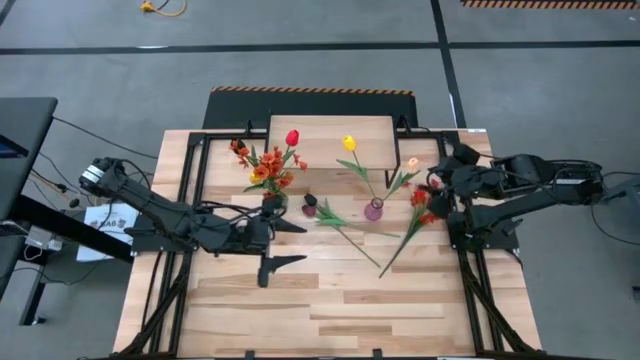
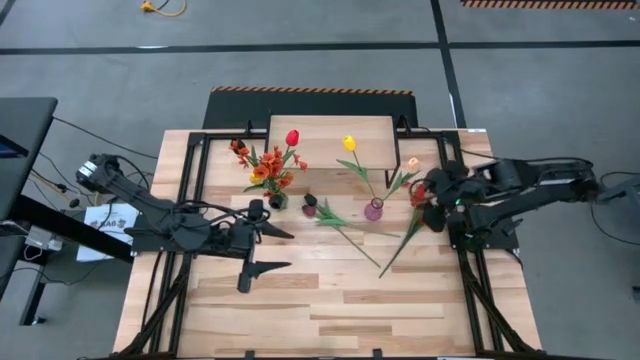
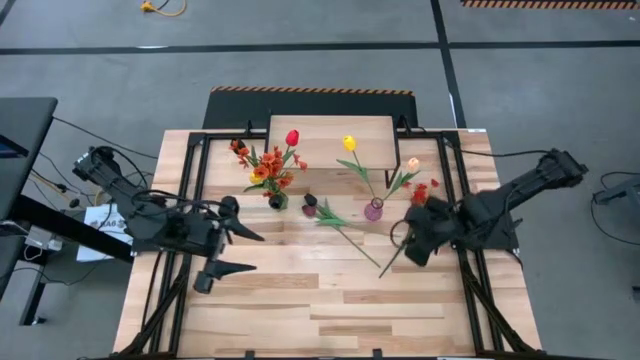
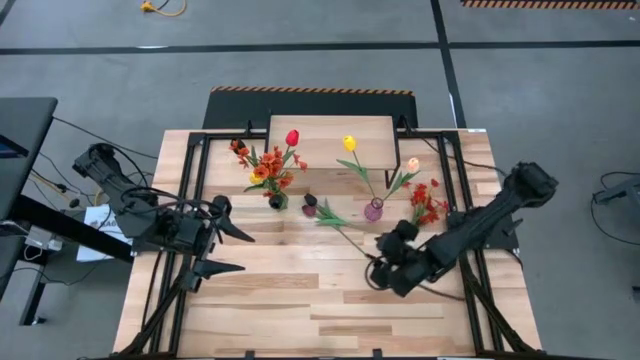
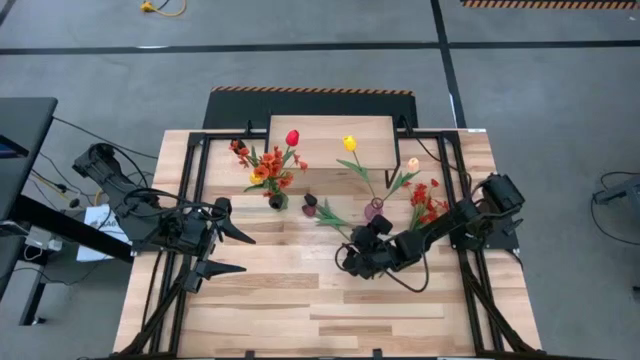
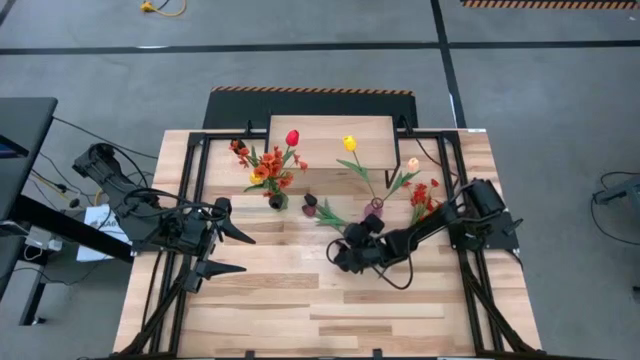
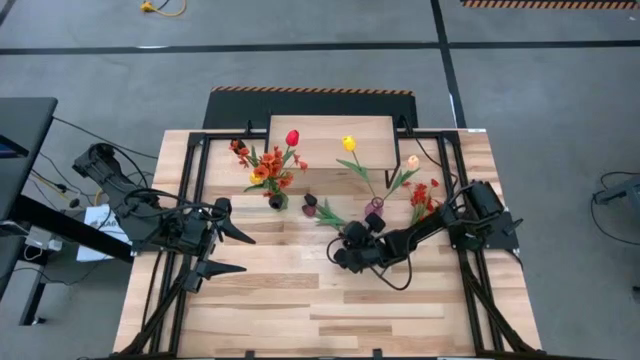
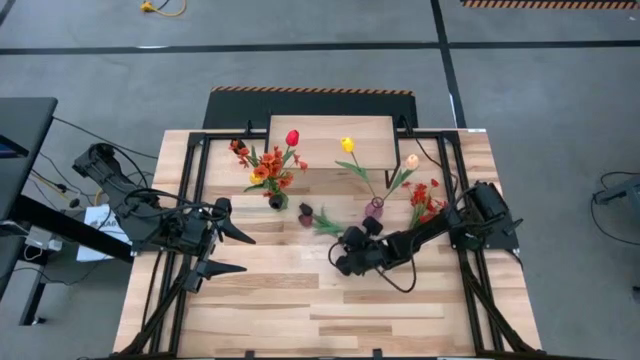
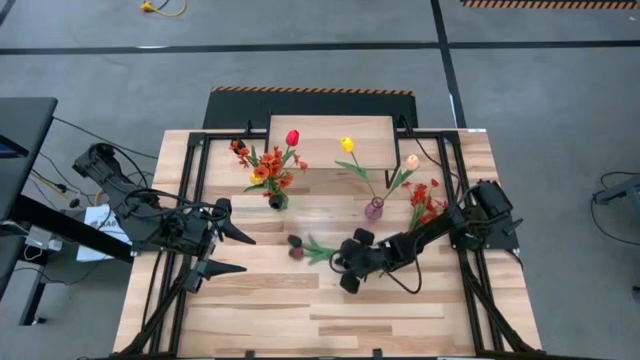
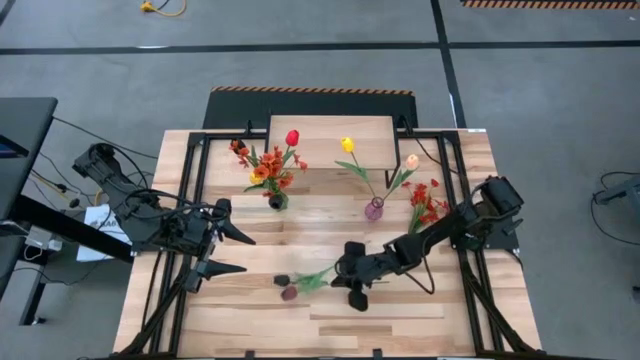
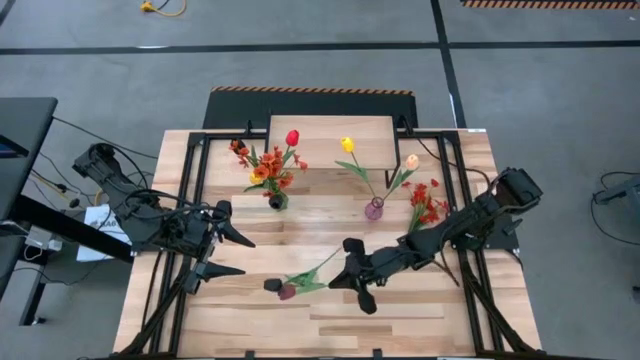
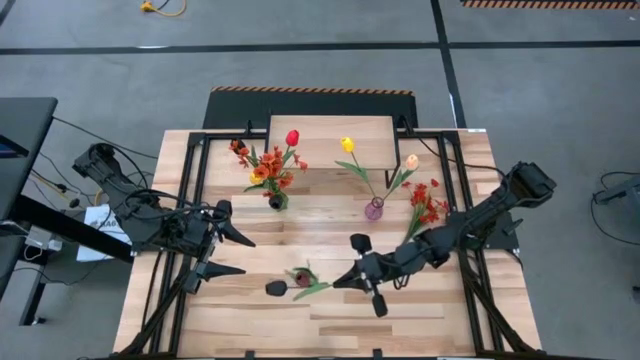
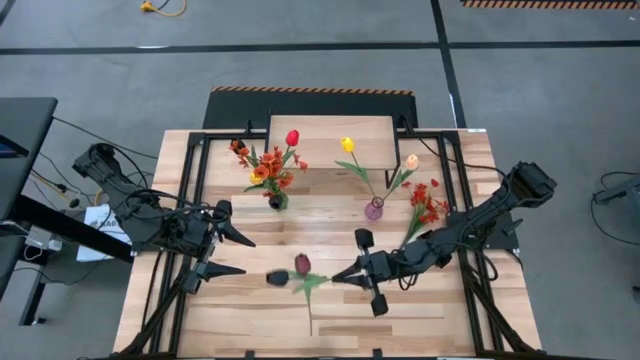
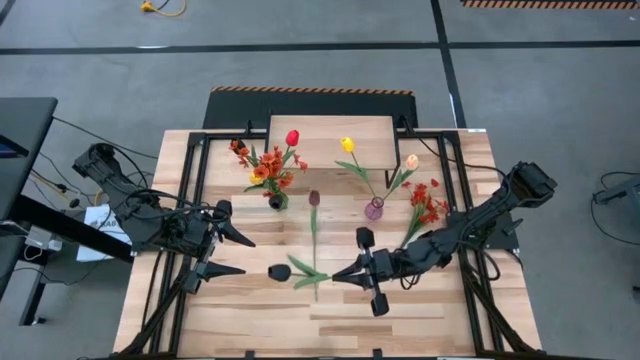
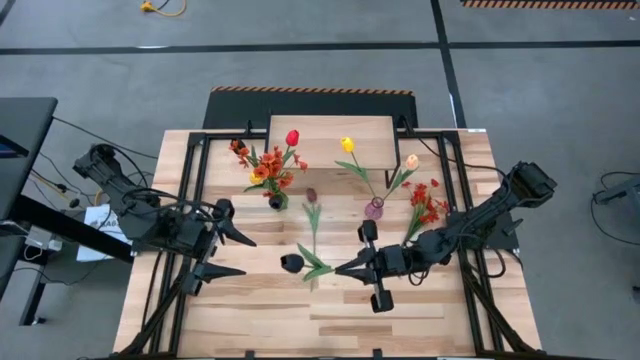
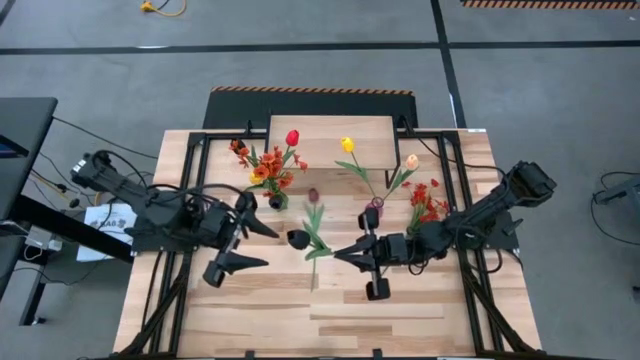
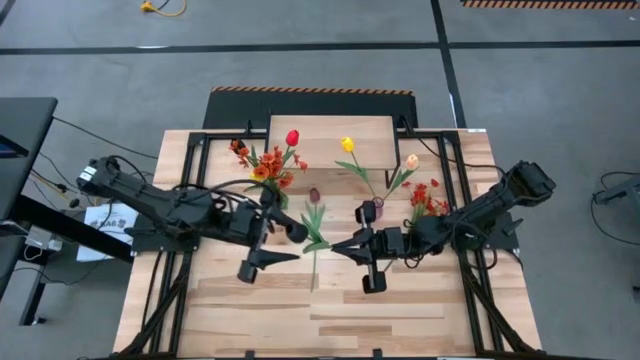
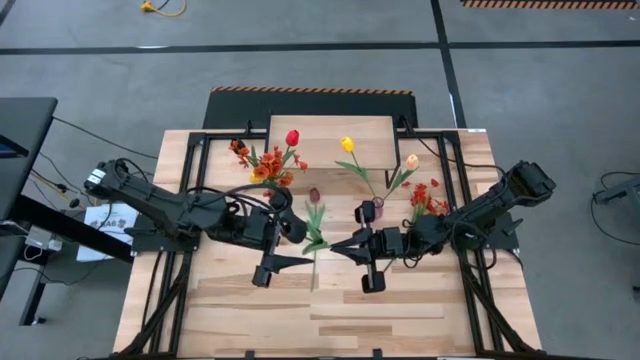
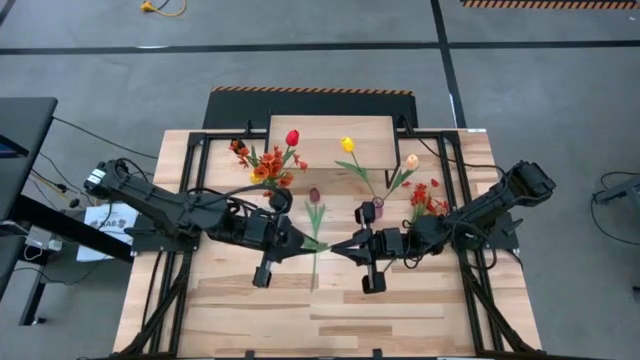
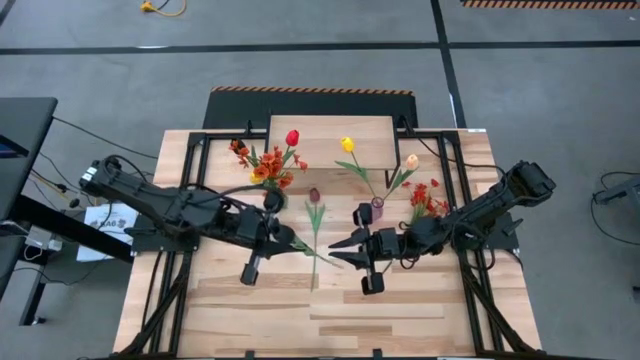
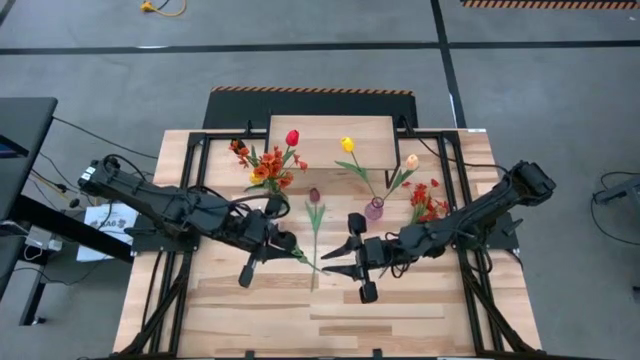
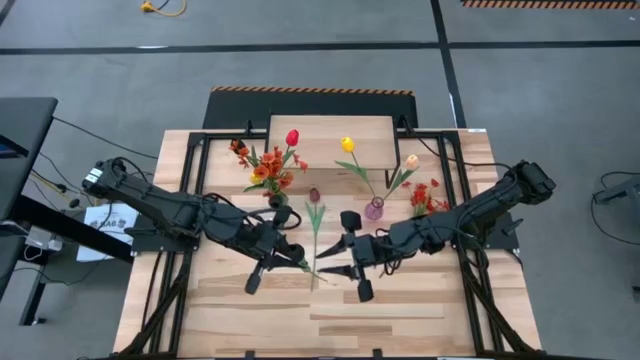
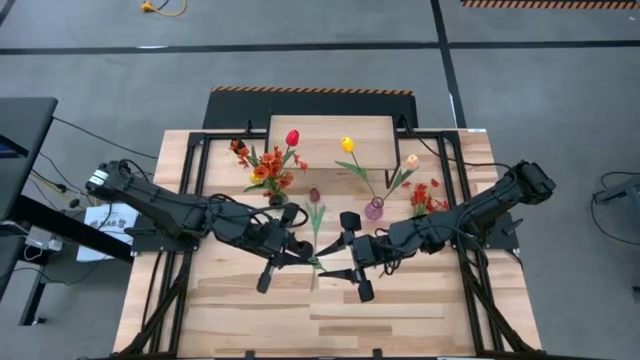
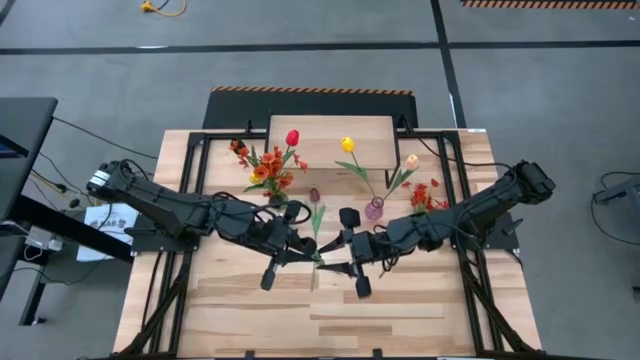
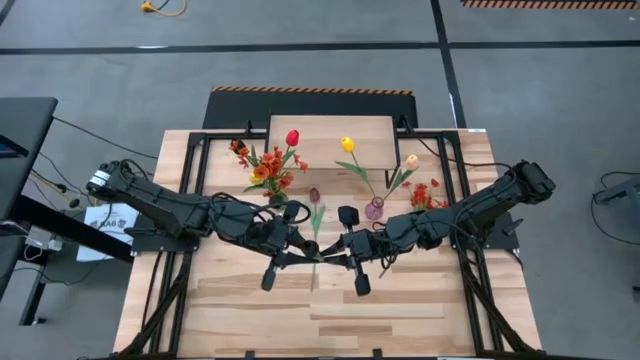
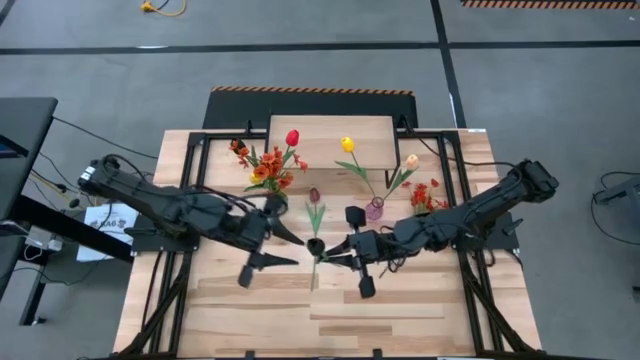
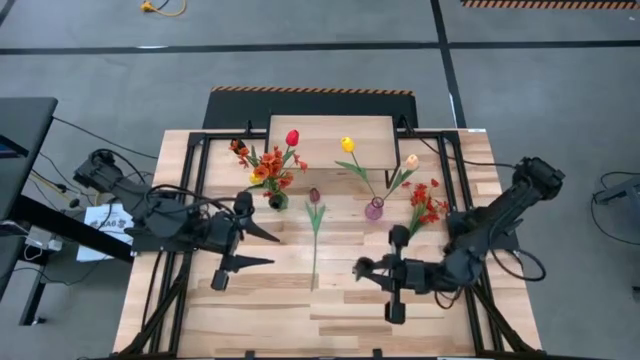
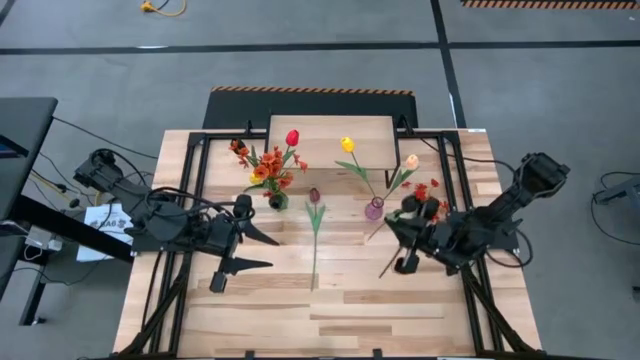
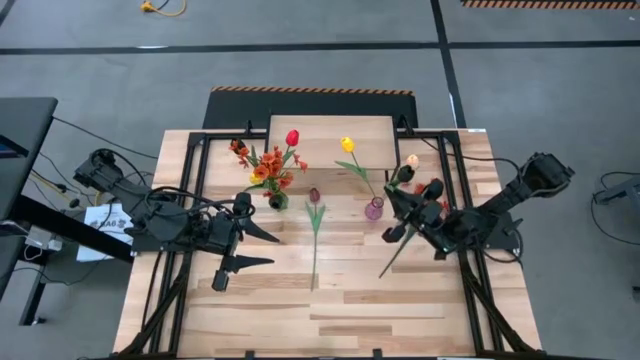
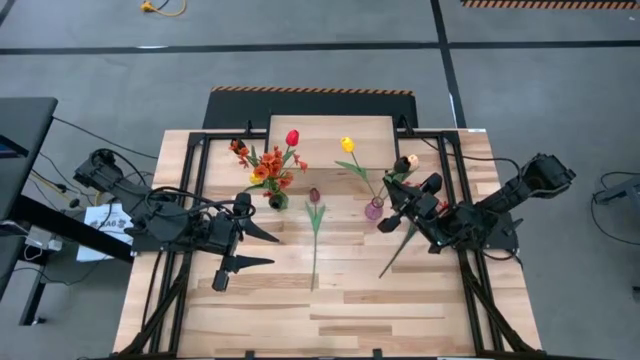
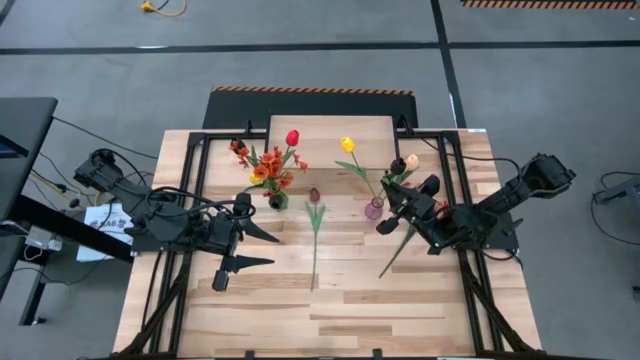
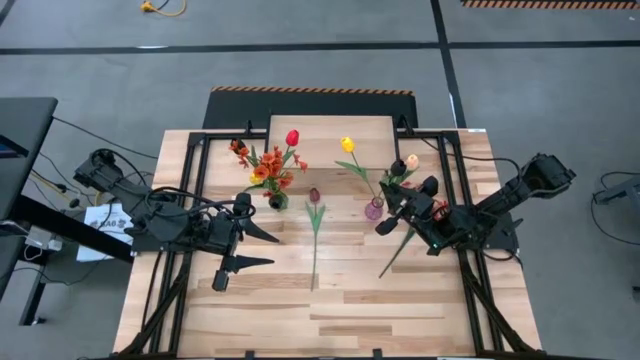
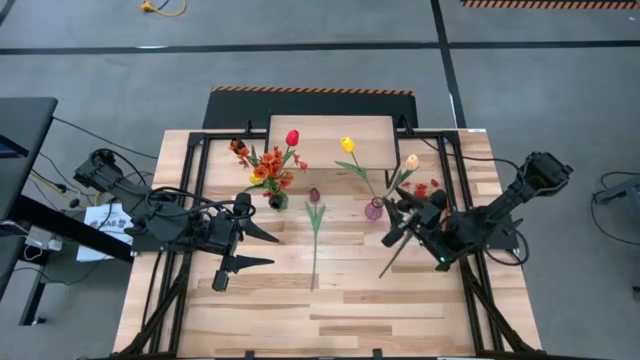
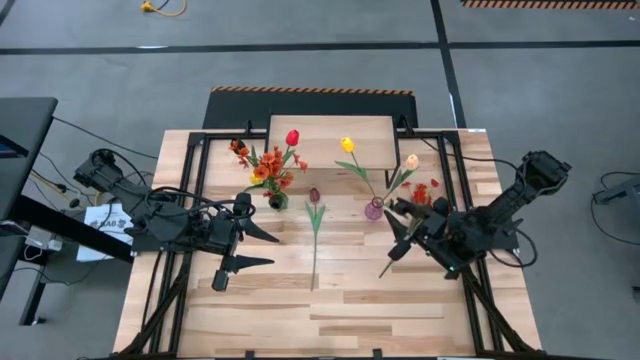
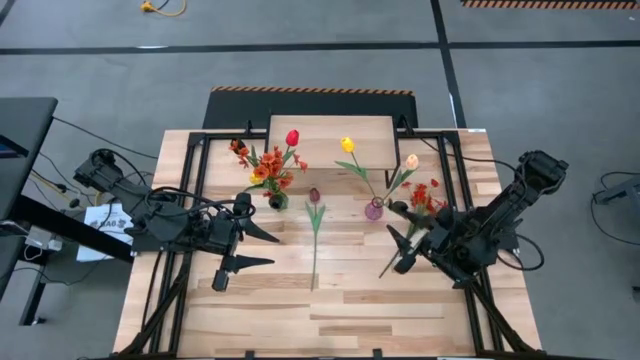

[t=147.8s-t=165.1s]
Task: Pick and place flowers into a vace then onto a shelf
Put the black tulip into the purple vase

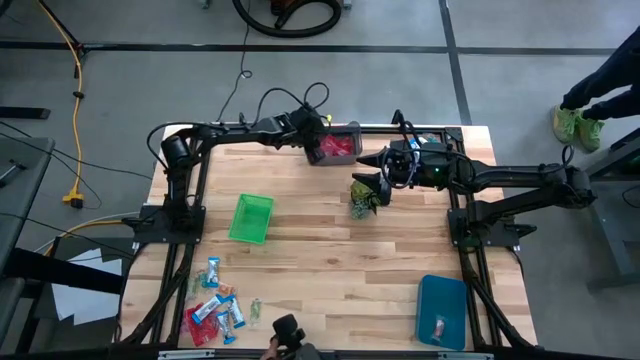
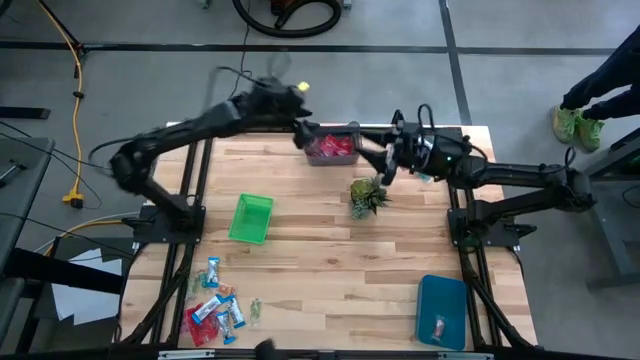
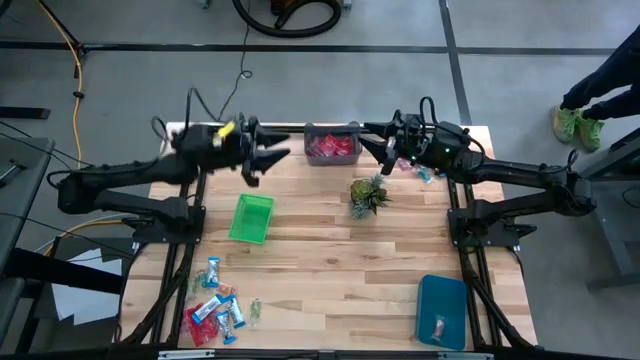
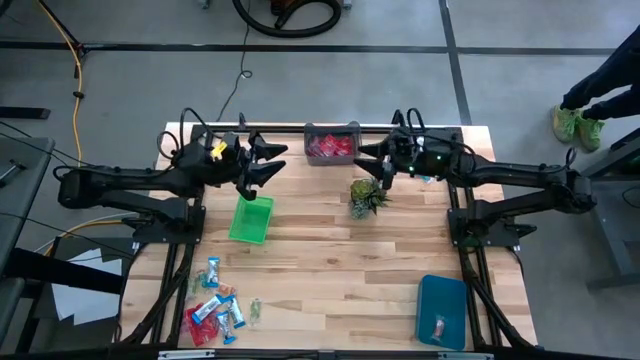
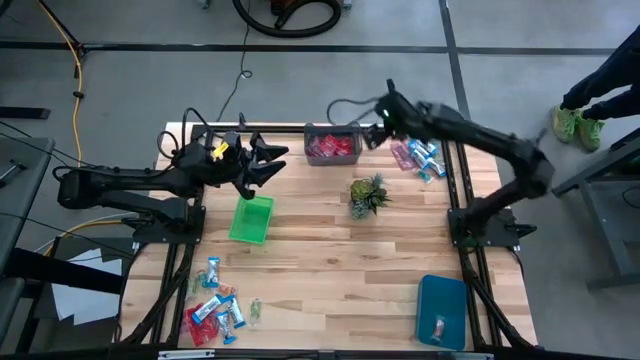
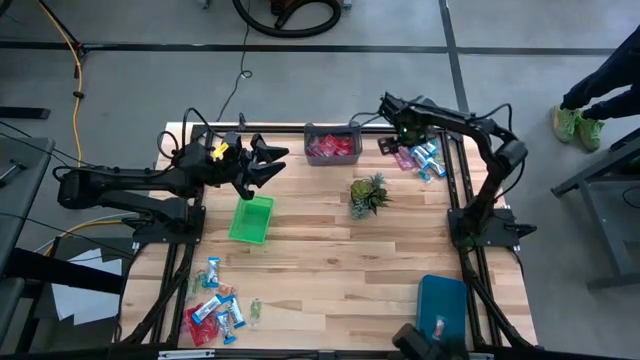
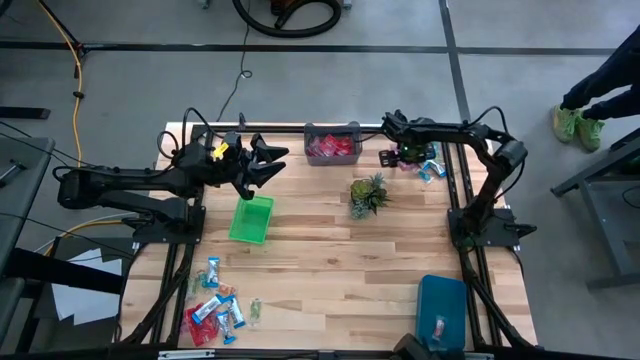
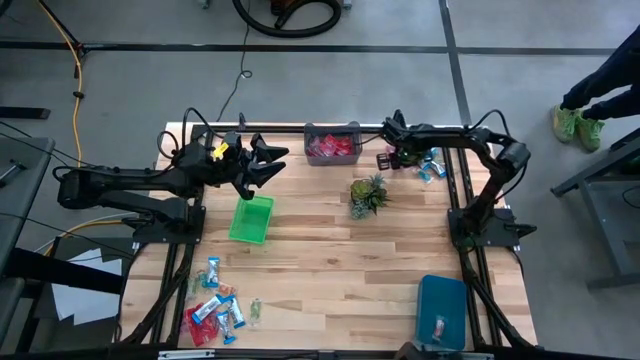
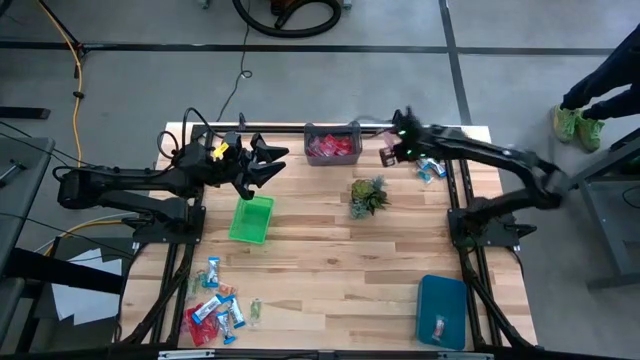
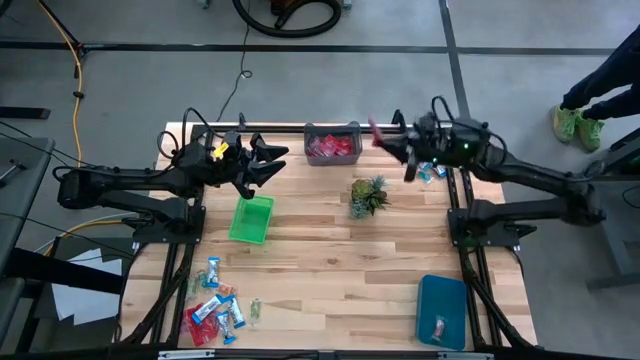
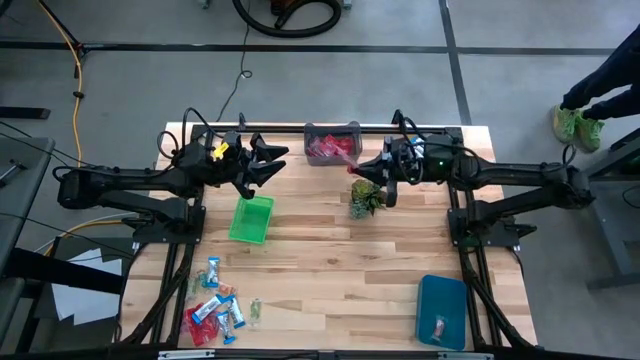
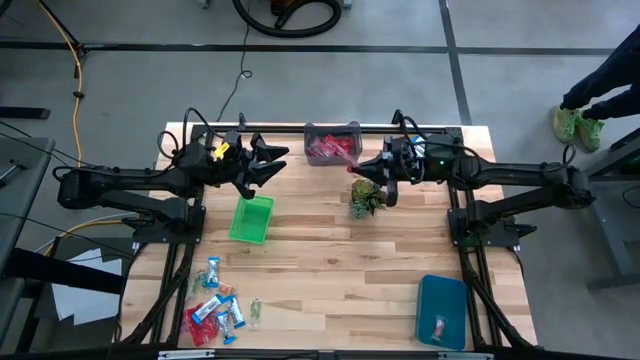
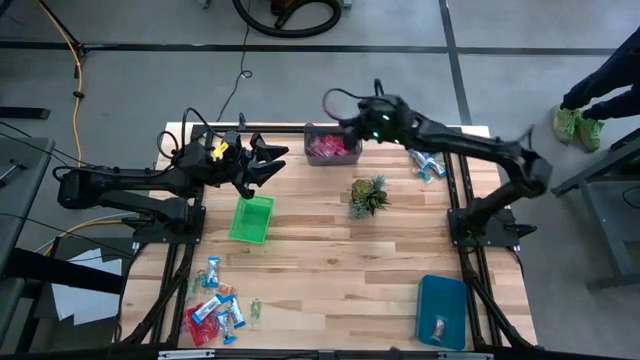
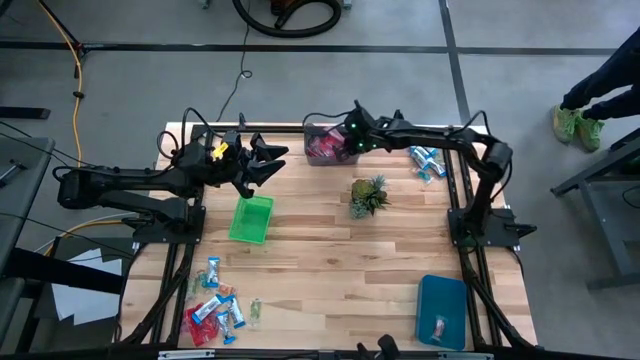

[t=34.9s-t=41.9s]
Task: Sort candy
Put the red candy into the black transparent bin
